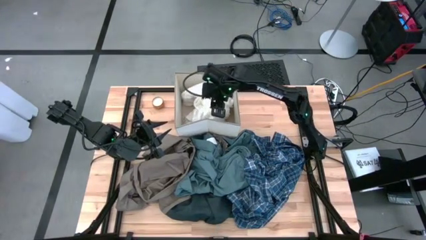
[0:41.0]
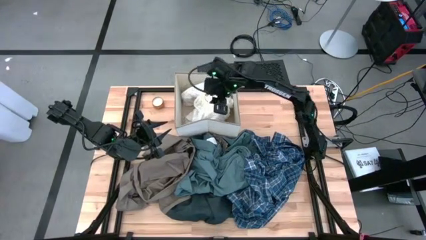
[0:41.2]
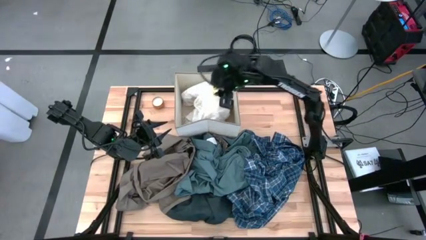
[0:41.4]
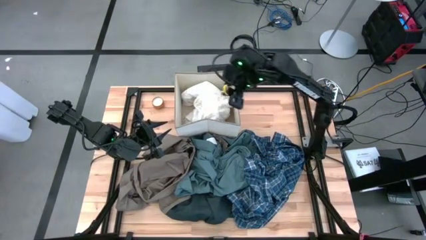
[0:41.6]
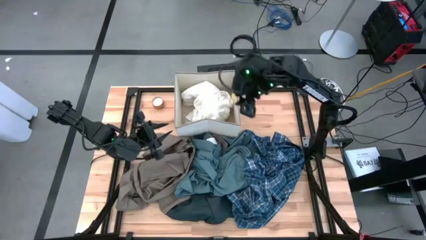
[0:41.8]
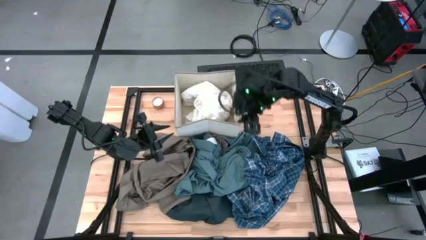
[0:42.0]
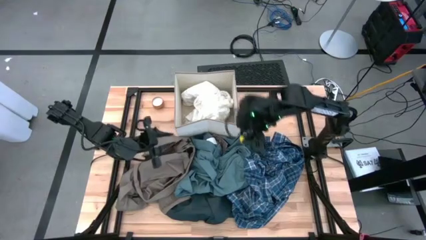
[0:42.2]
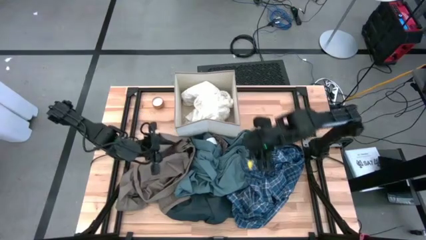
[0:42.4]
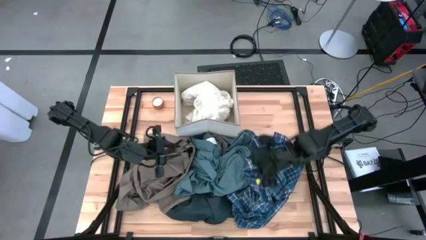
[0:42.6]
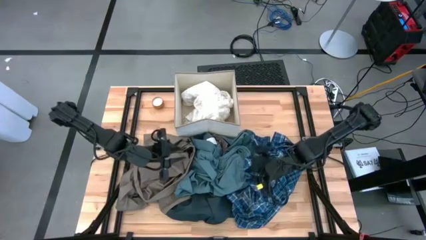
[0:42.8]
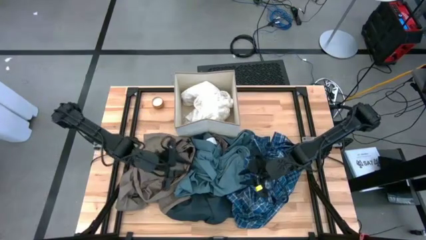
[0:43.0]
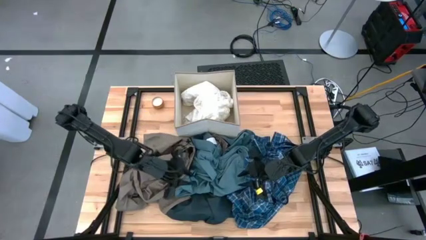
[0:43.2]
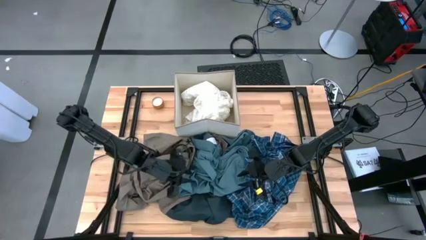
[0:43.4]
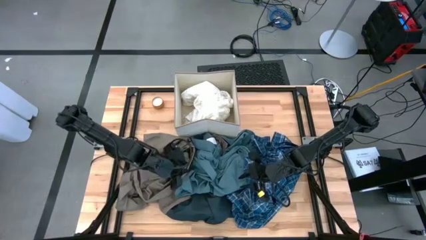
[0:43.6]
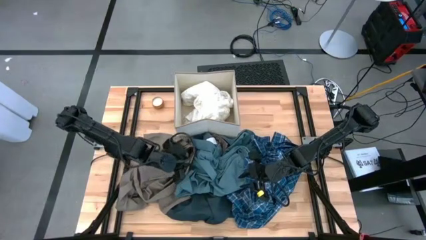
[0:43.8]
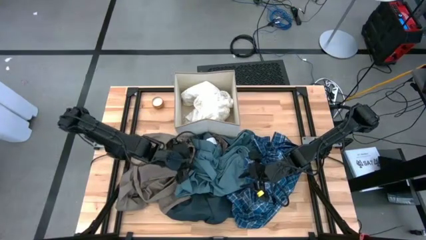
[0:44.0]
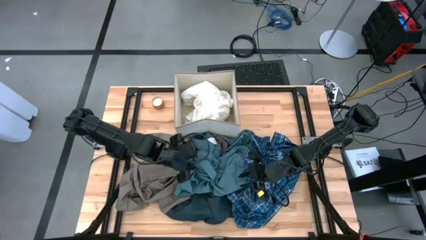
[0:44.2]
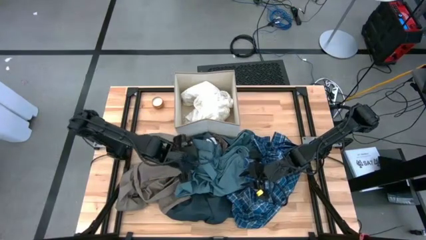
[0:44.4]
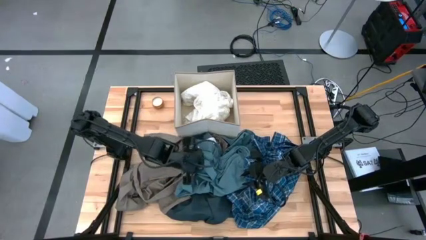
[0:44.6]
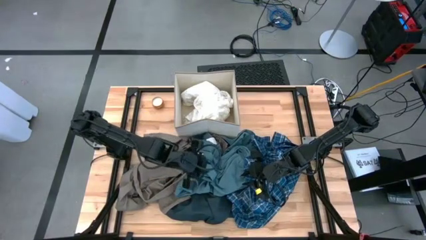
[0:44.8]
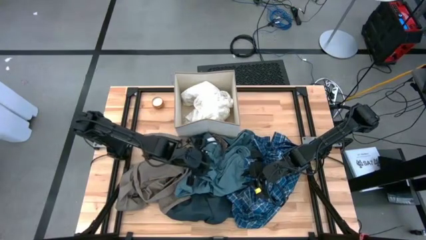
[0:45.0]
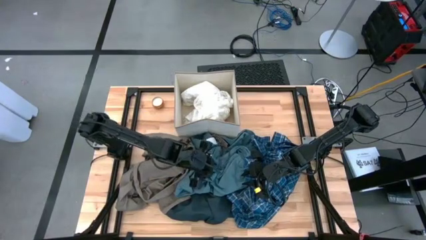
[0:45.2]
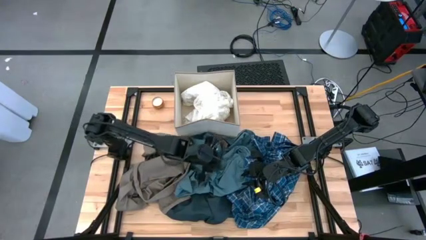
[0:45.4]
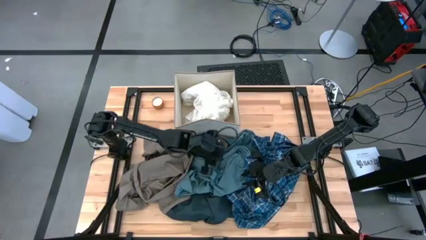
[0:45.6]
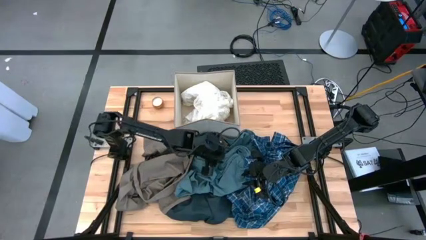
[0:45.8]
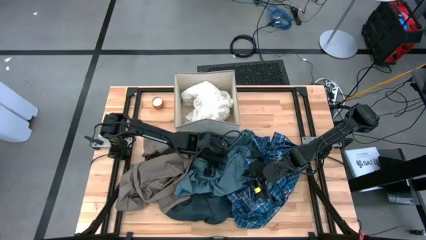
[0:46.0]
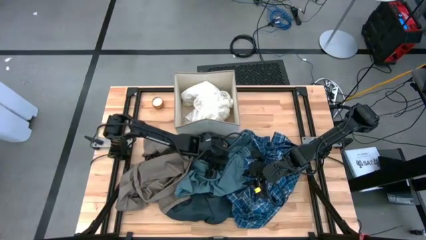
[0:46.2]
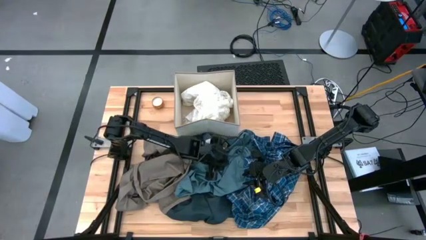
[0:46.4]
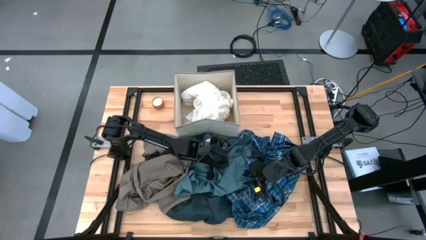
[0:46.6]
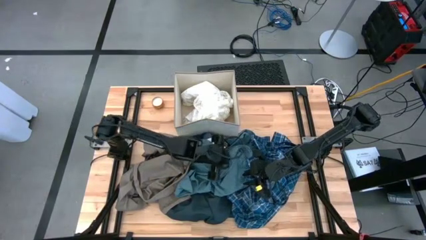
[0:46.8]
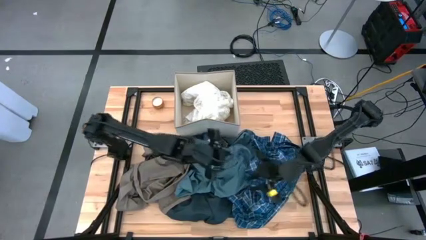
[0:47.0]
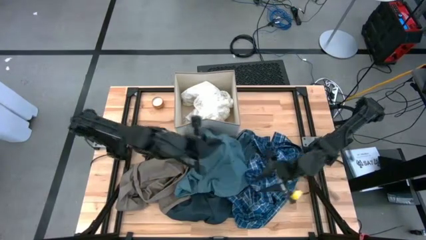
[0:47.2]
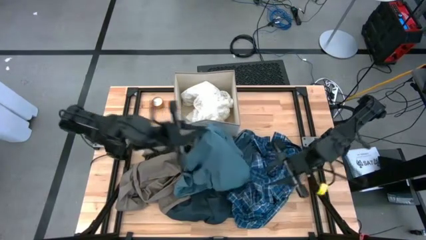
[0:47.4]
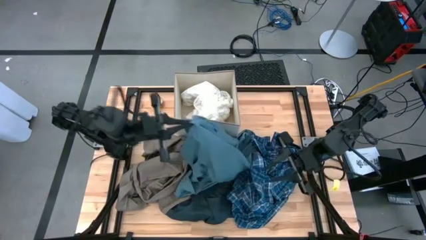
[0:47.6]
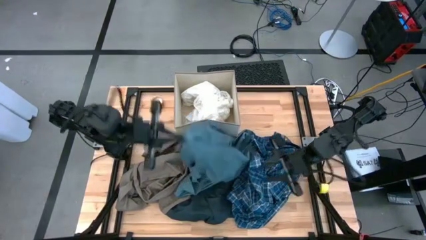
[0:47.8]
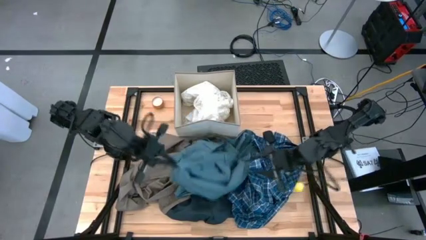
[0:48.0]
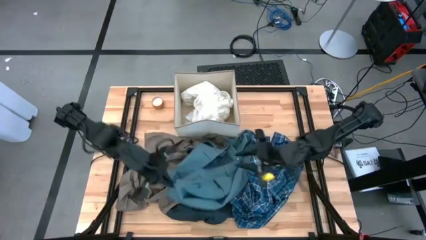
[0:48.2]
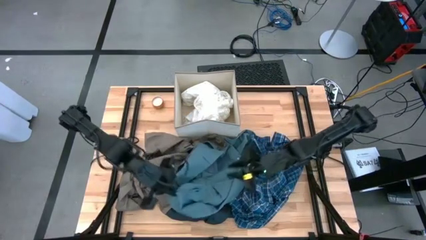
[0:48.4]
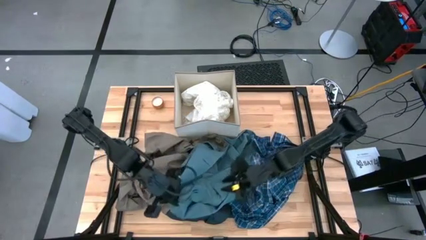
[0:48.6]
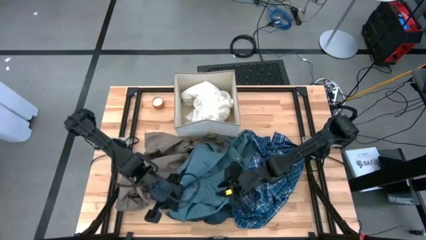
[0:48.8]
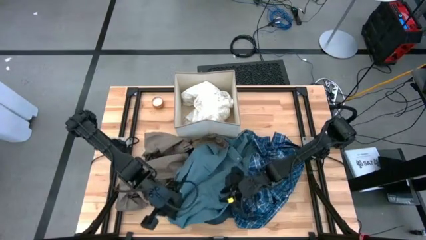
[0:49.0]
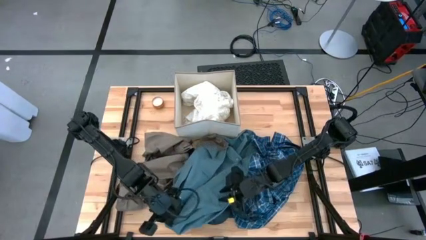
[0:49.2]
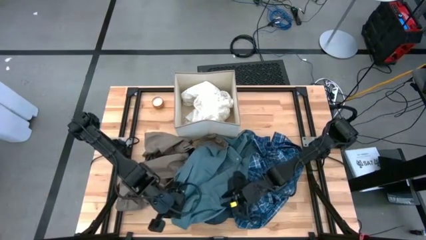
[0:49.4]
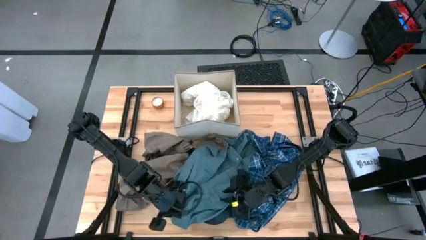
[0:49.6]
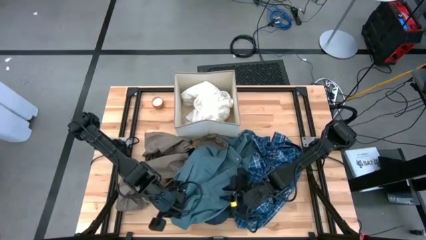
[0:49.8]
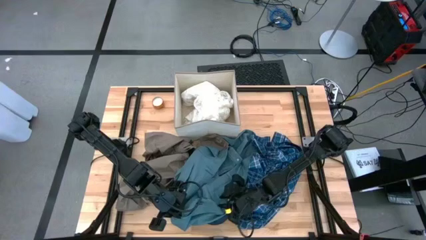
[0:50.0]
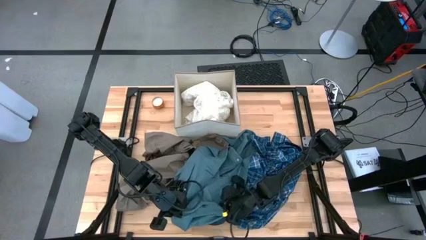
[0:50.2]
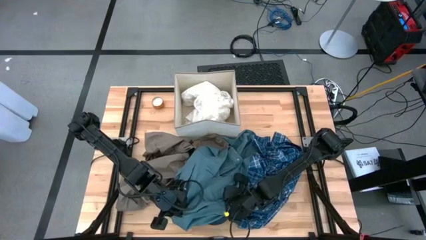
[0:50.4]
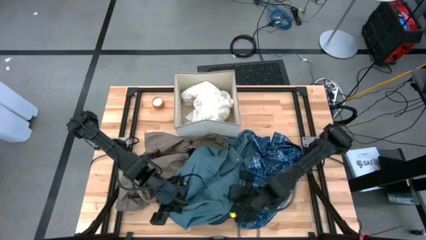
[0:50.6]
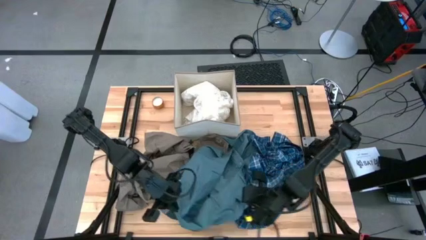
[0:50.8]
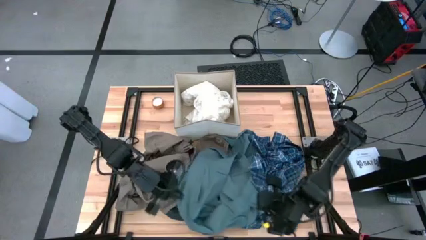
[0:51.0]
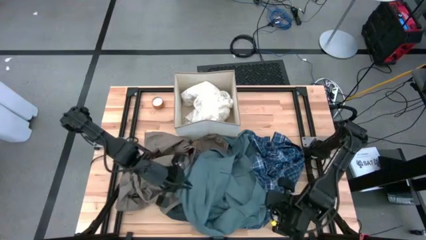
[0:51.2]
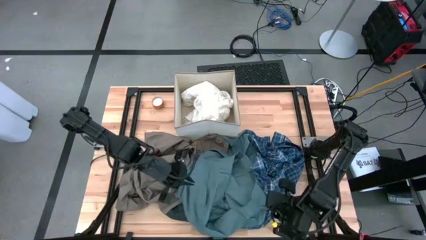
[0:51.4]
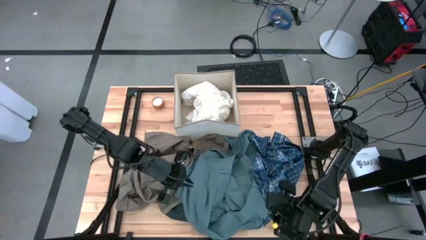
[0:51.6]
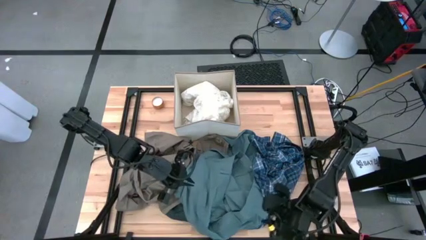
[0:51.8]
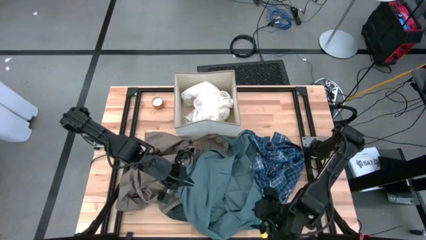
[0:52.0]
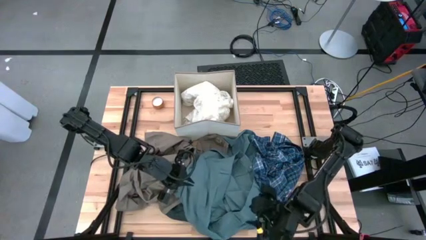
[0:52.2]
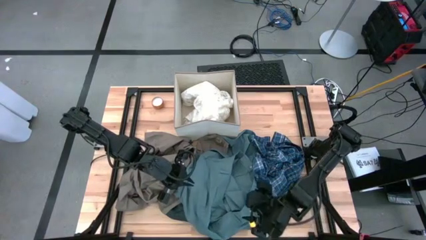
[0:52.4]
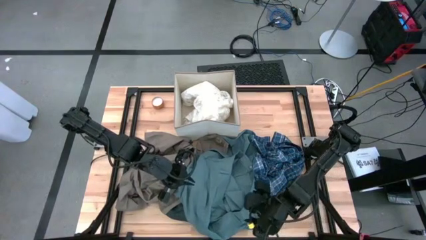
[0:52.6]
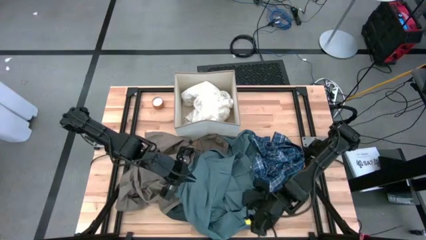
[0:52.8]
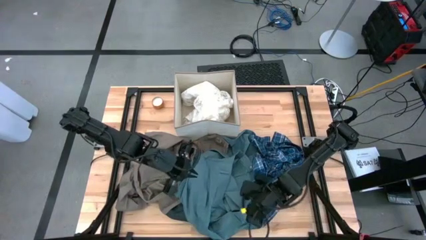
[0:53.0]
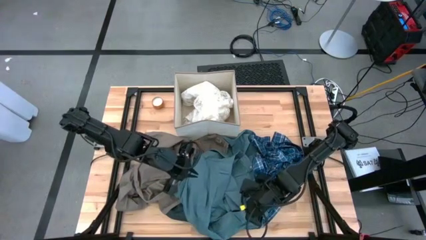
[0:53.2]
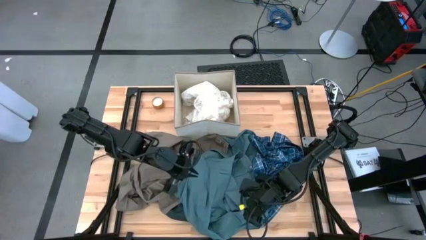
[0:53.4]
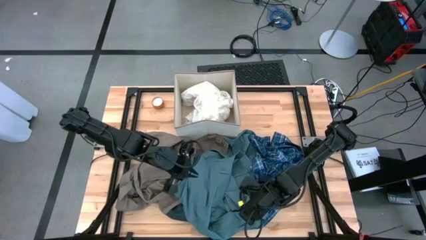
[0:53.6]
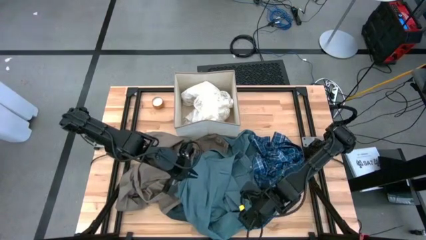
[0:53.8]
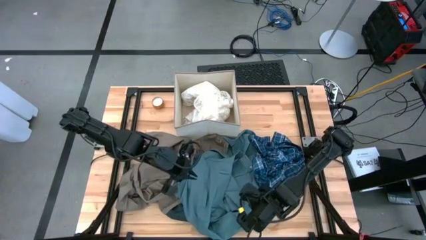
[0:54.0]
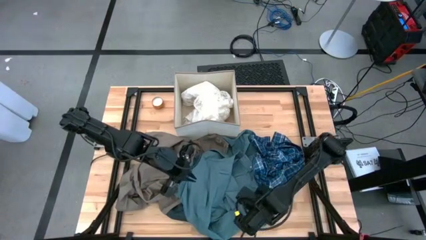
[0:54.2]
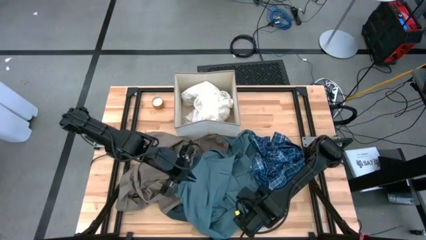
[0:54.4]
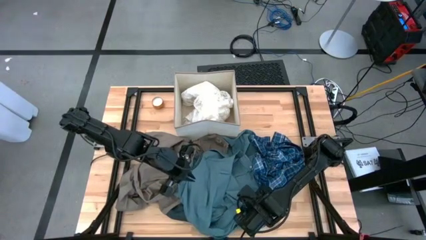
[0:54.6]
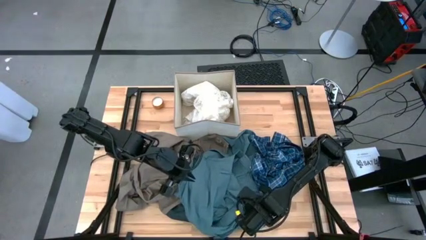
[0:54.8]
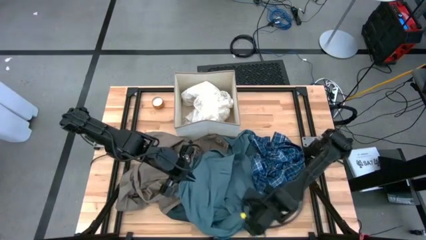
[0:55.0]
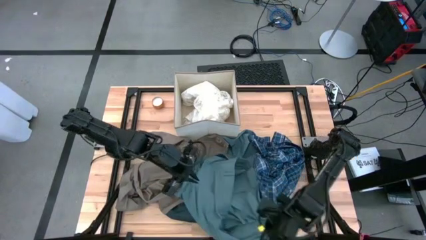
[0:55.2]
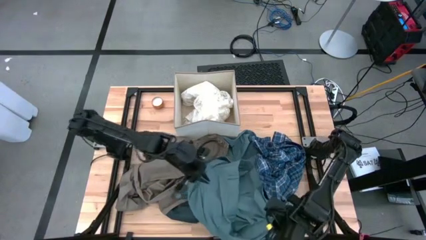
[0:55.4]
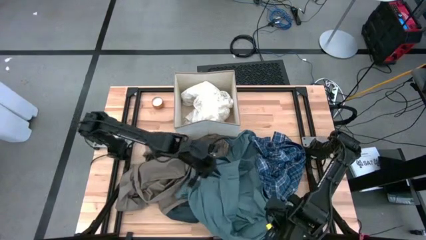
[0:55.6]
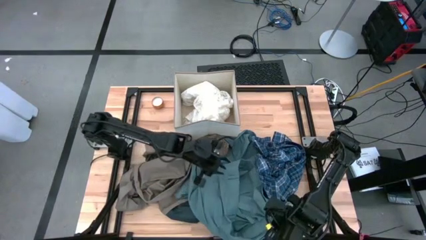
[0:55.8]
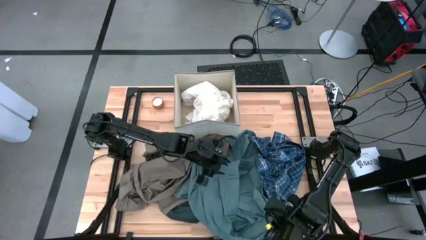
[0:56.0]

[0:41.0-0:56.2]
Task: Sort clothes
Put the green pants into the laundry bin
